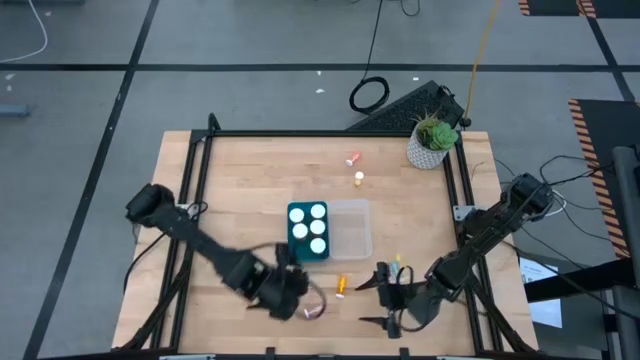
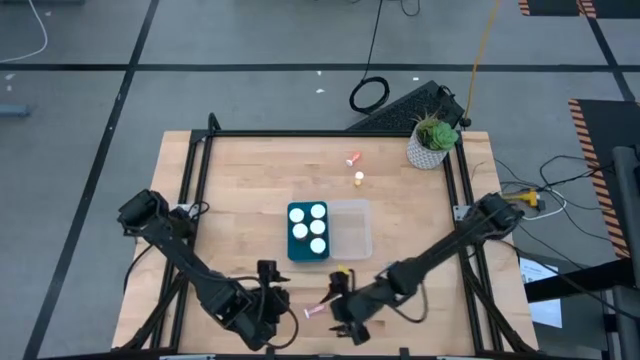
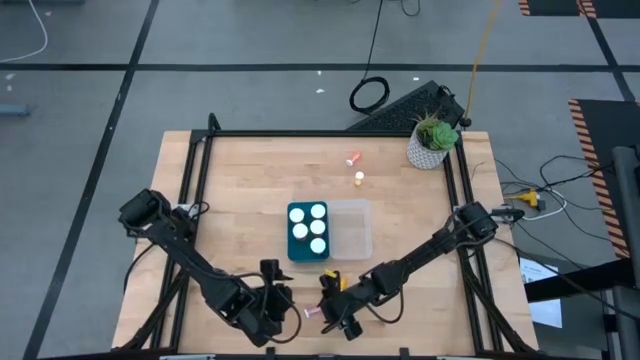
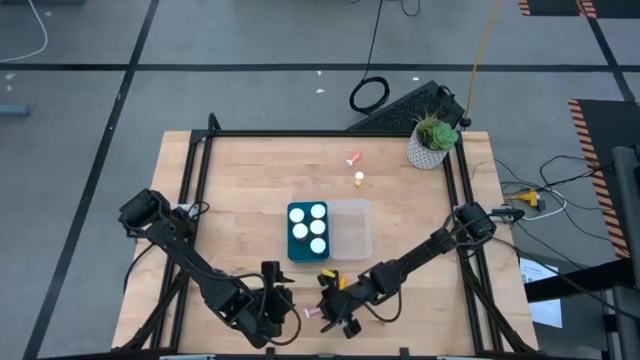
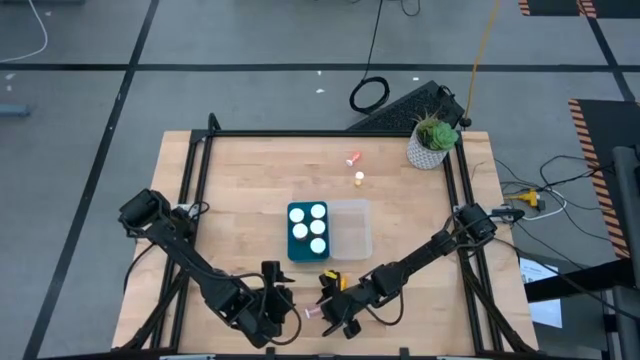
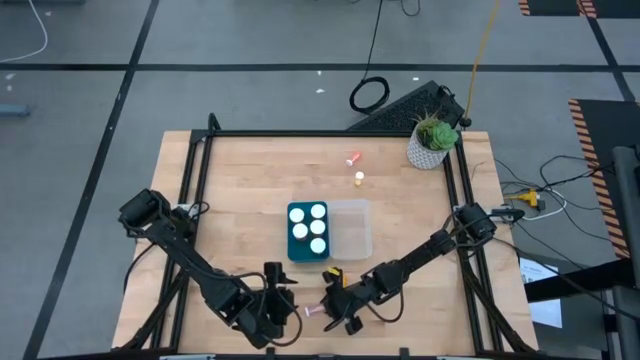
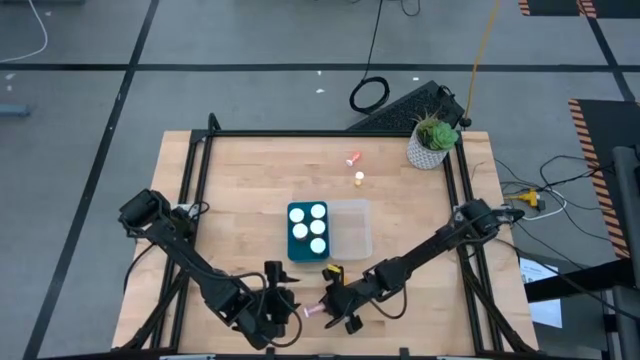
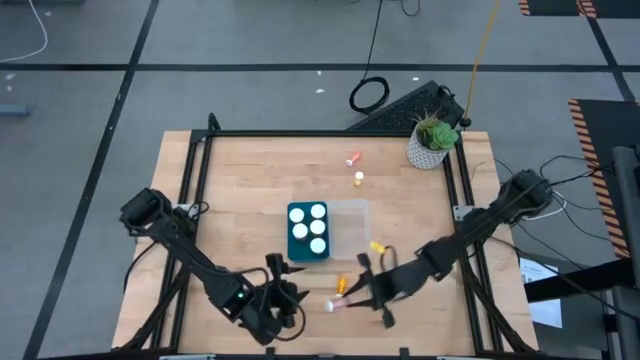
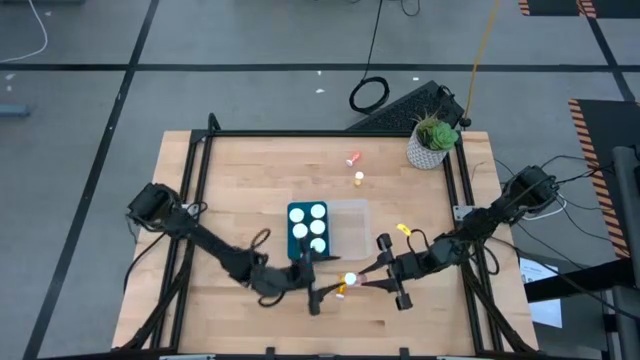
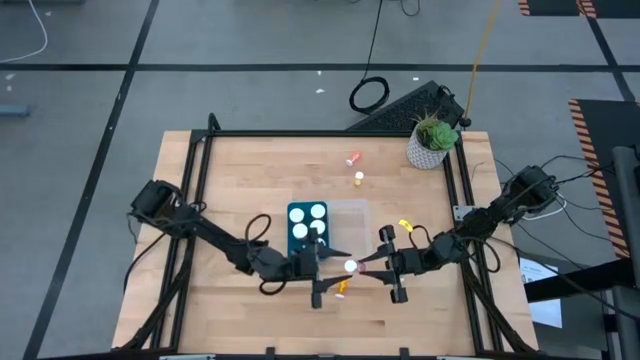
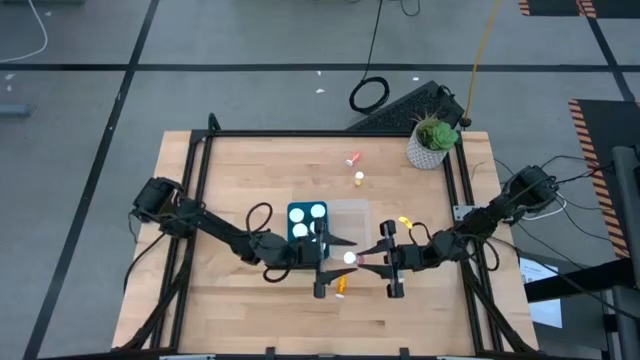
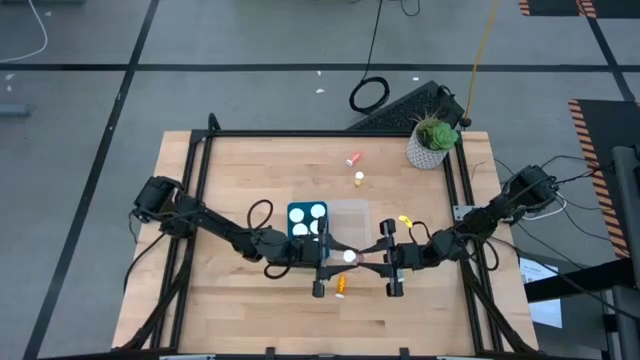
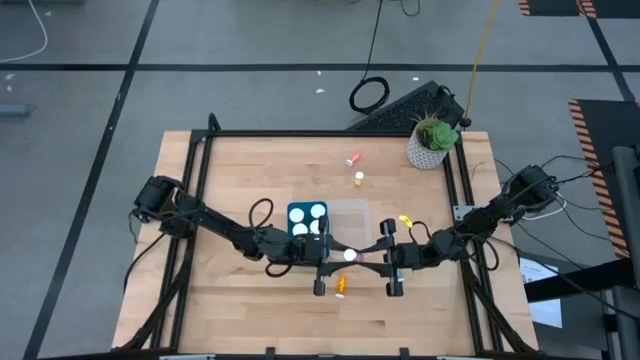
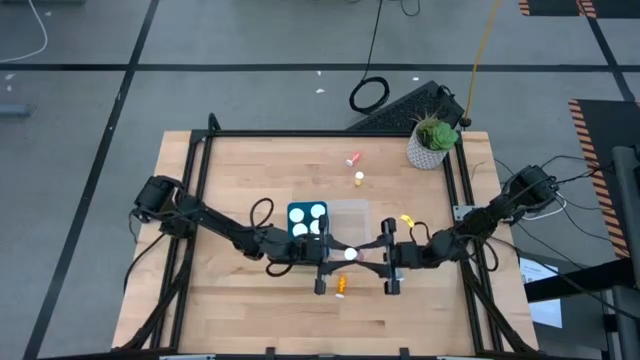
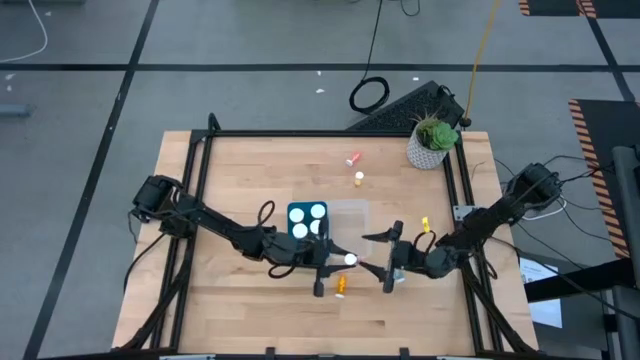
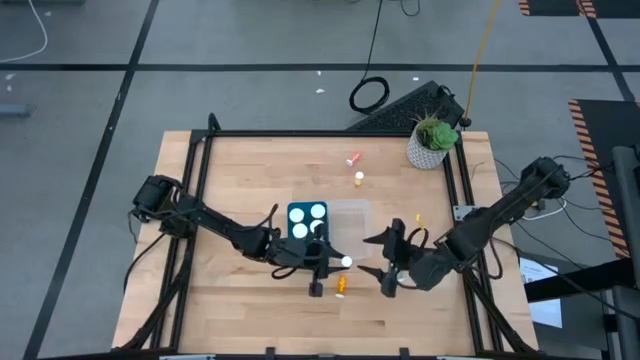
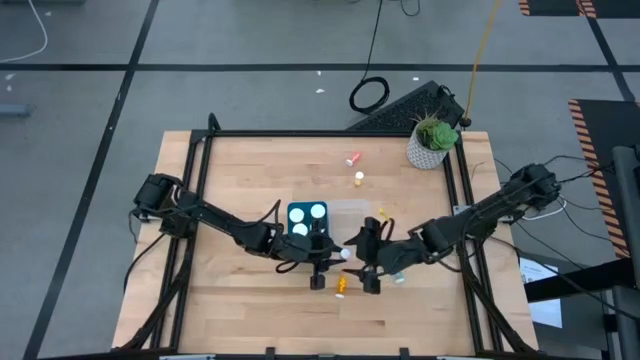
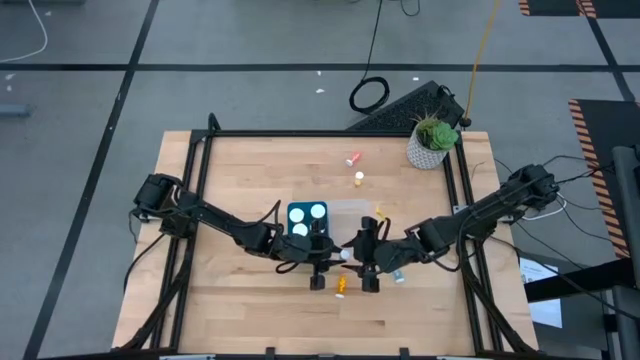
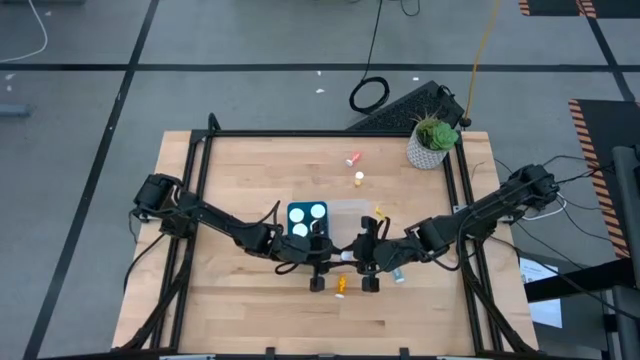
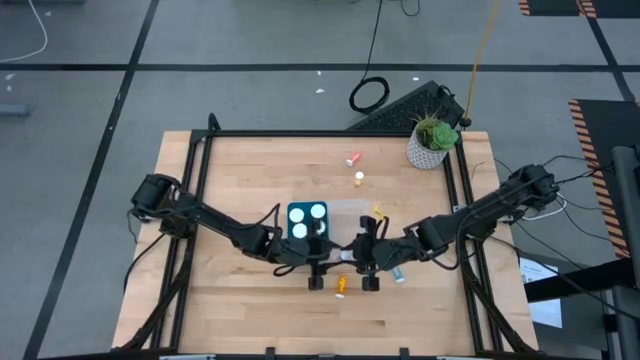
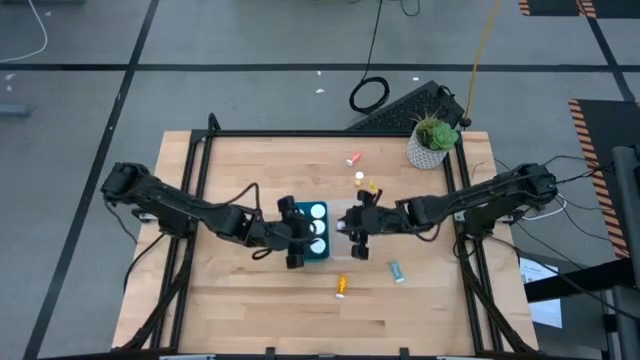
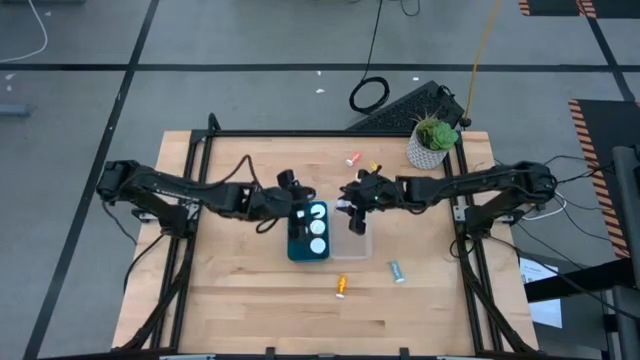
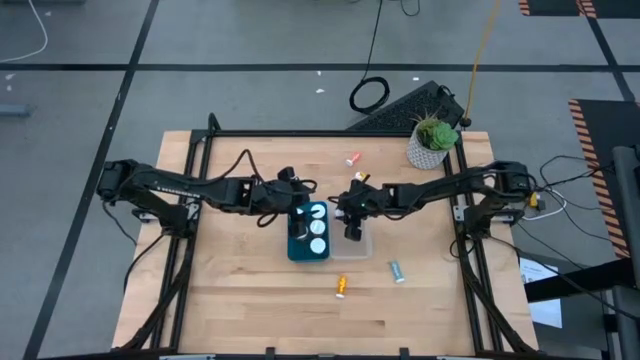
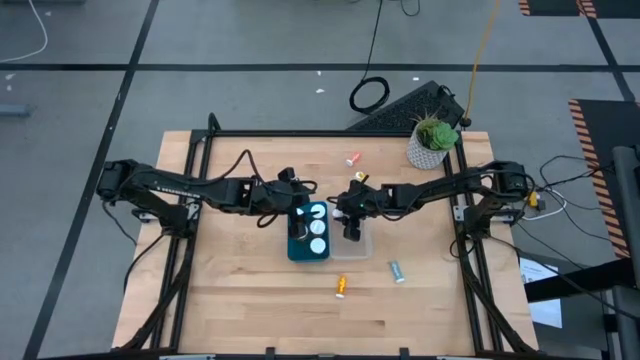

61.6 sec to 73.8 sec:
Task: Pick and place medicine bottles into bin by pill shape (circle, oval)
Put the small pink pill bottle into the transparent bin

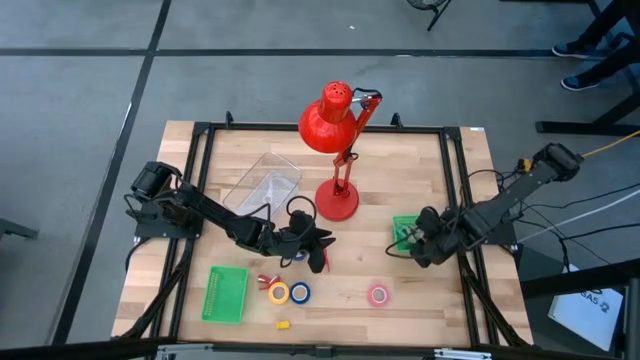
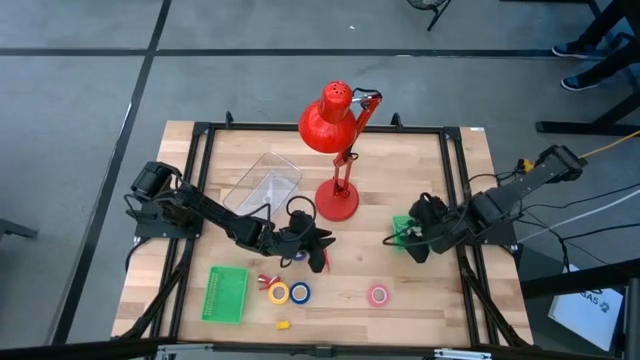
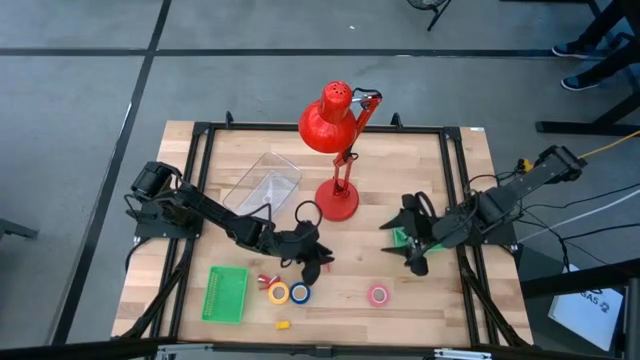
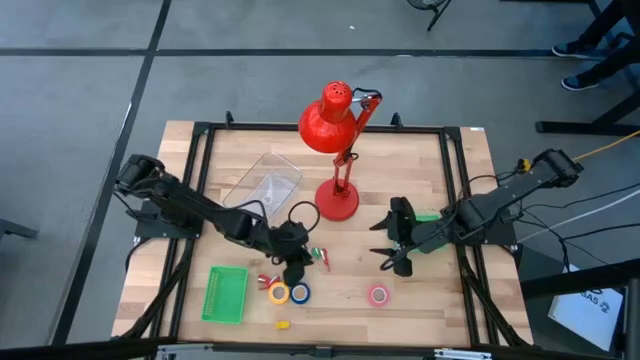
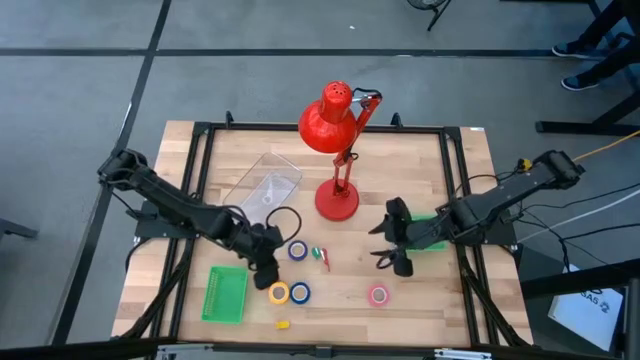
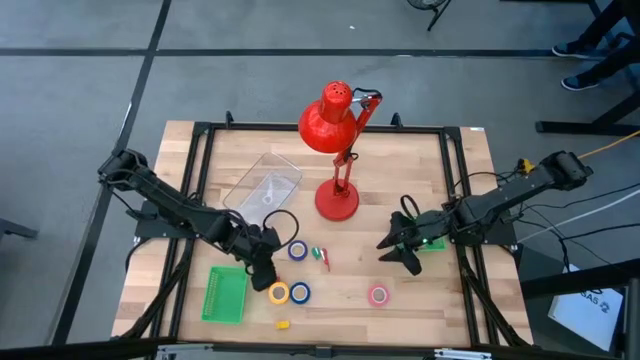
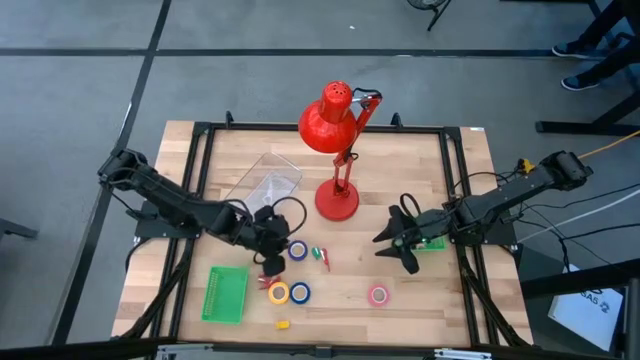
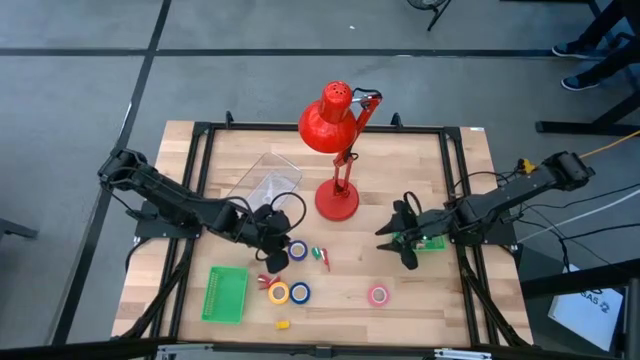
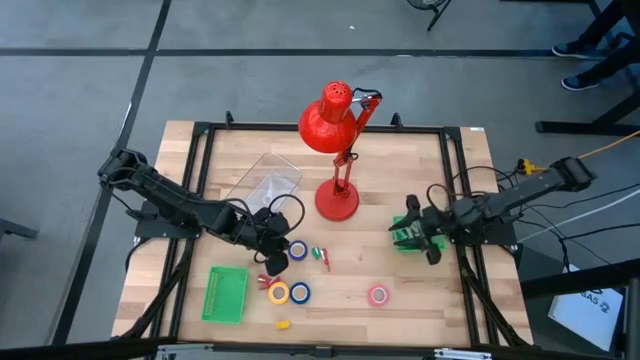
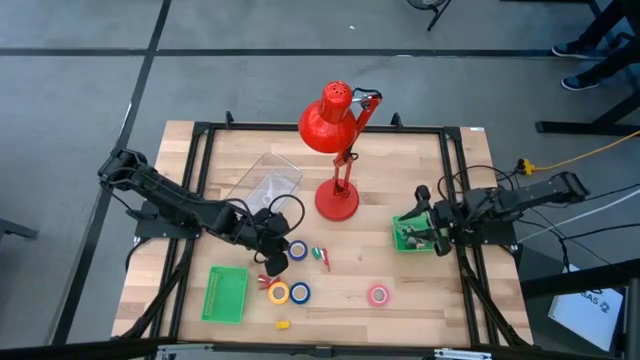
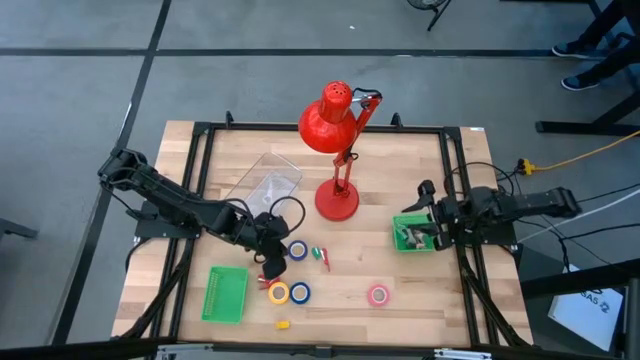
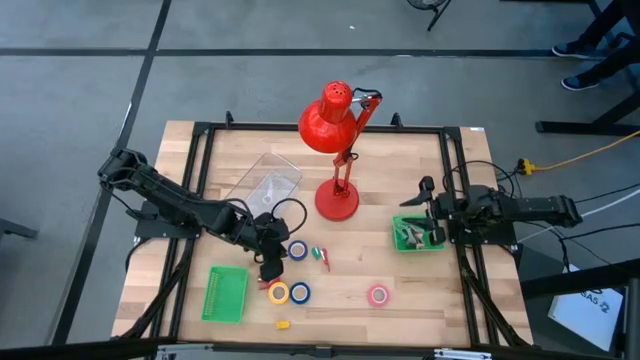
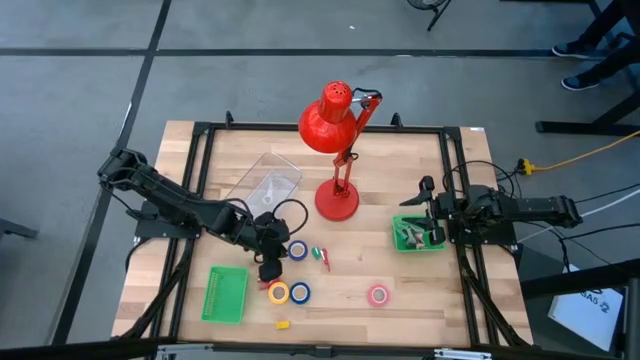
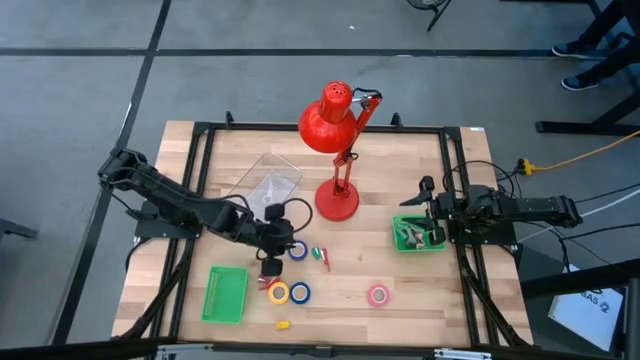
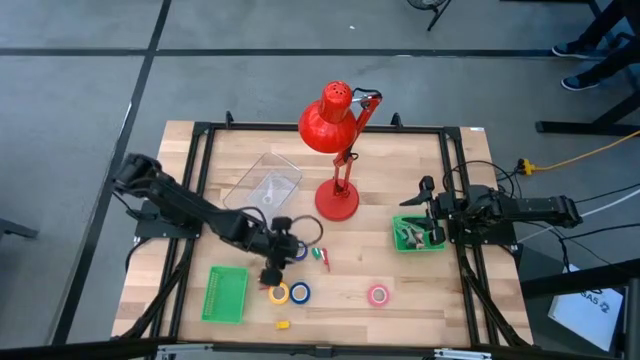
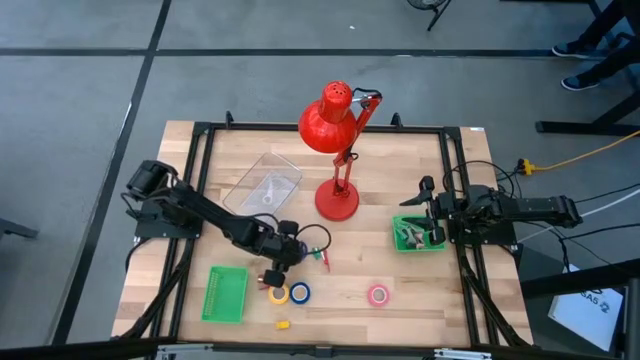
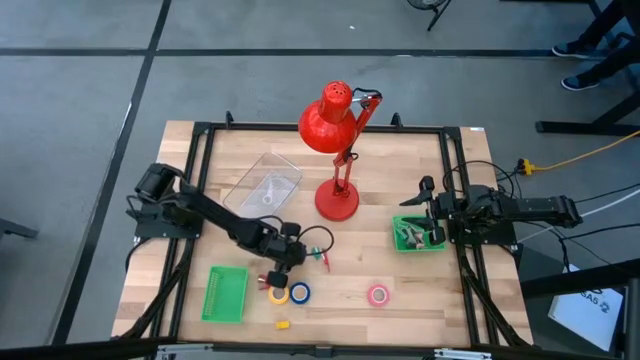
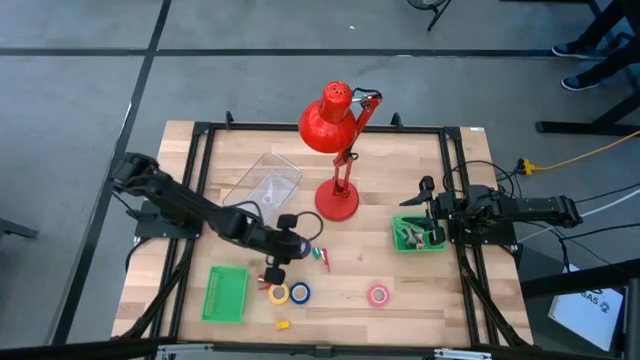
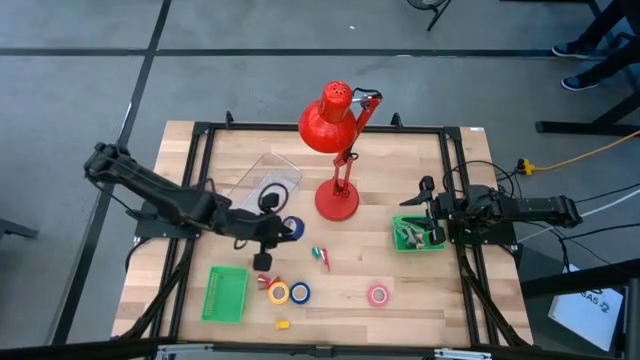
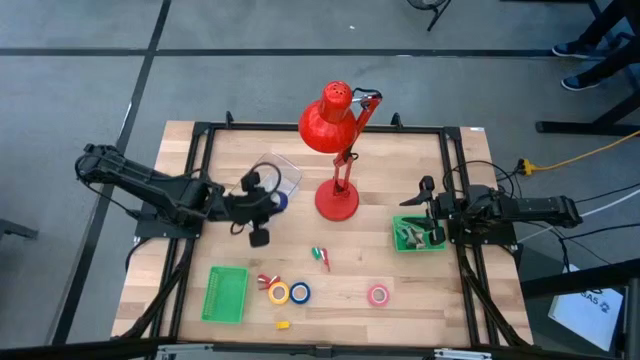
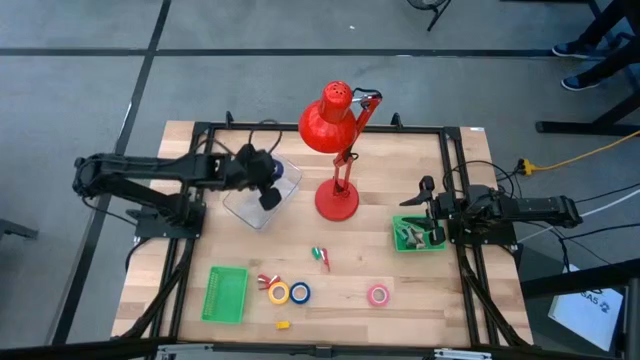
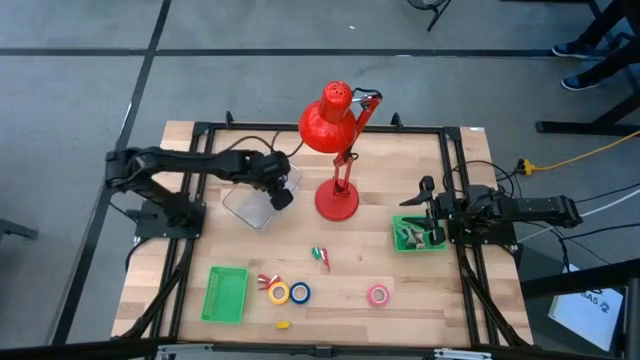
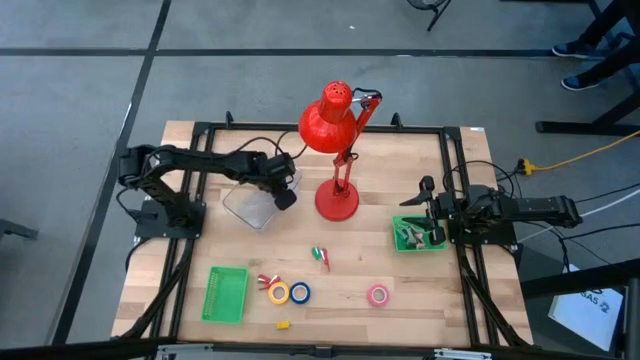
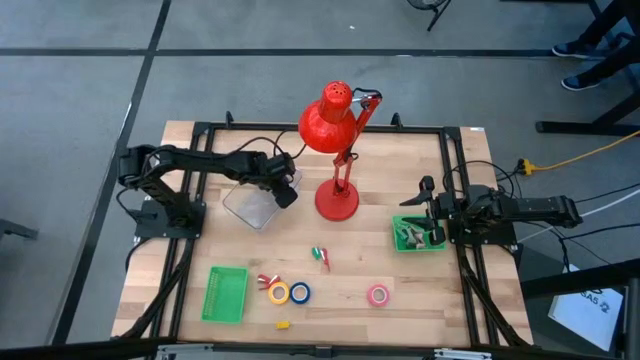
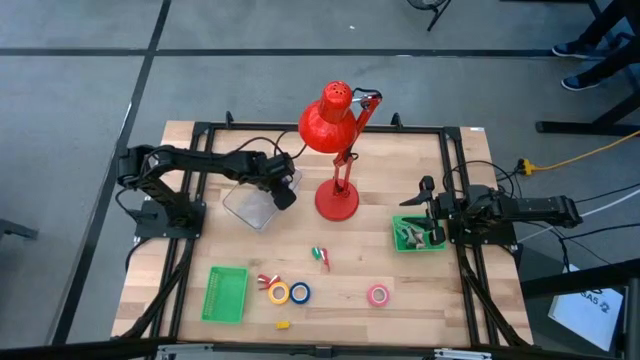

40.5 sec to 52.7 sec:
Task: Pick and place Stapler, Stapler remover, tape
Put the top blue tape into the transparent bin
